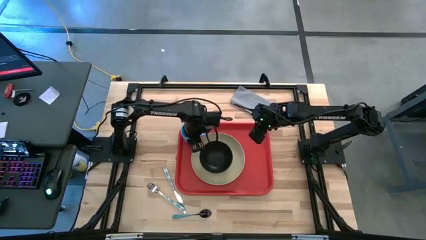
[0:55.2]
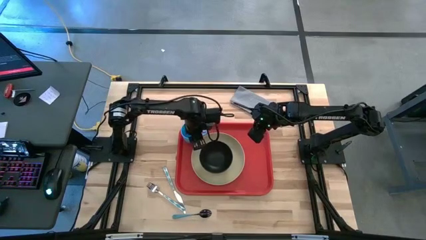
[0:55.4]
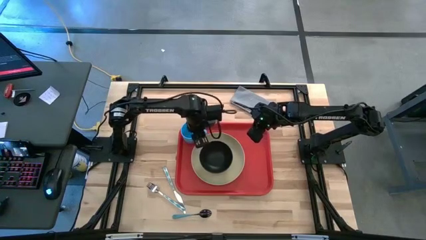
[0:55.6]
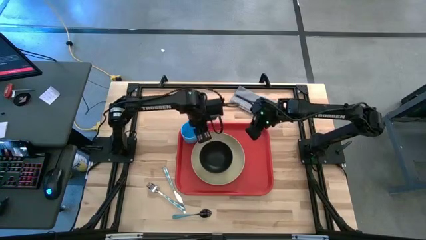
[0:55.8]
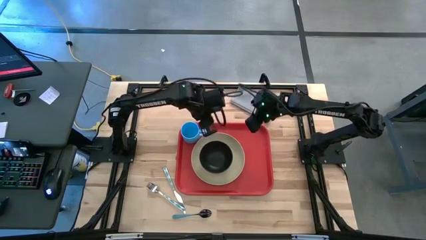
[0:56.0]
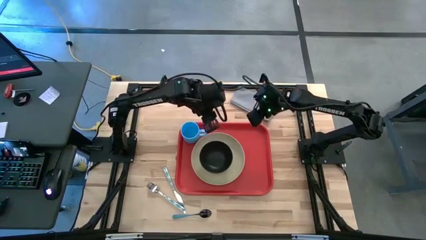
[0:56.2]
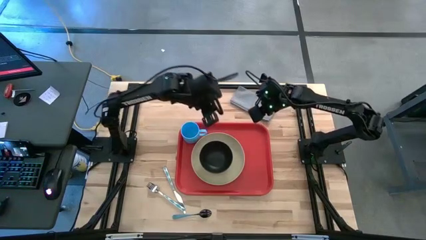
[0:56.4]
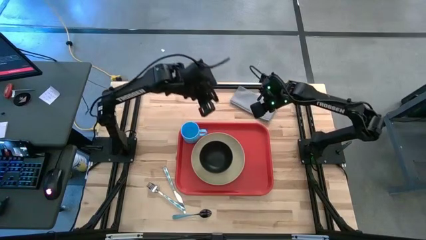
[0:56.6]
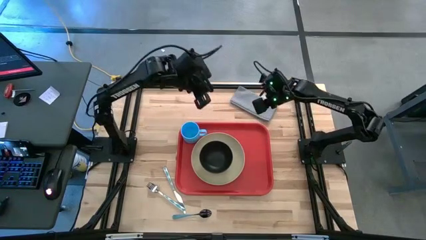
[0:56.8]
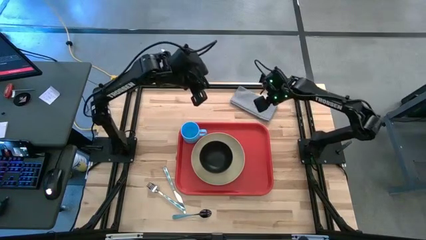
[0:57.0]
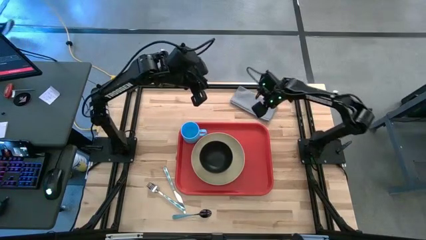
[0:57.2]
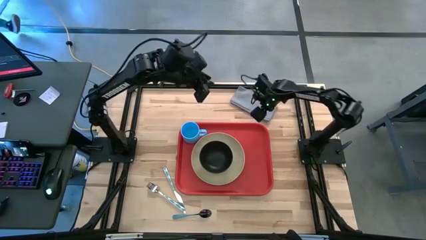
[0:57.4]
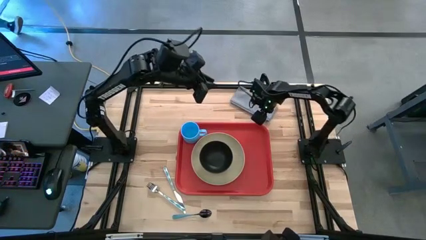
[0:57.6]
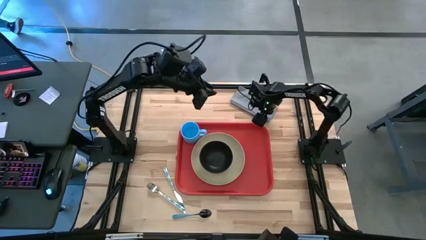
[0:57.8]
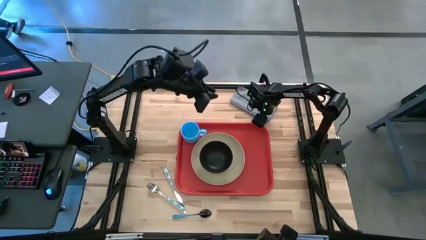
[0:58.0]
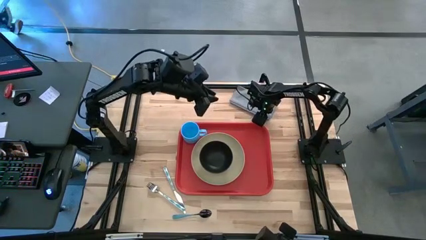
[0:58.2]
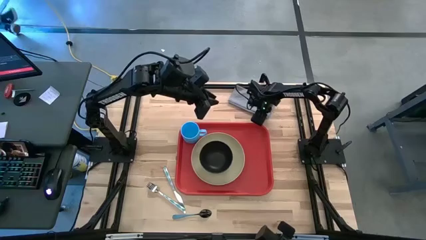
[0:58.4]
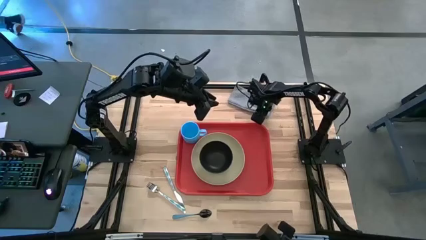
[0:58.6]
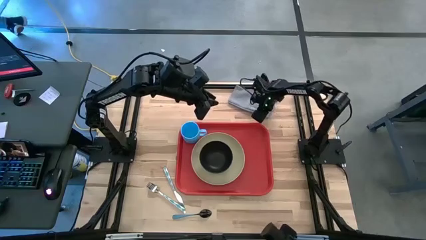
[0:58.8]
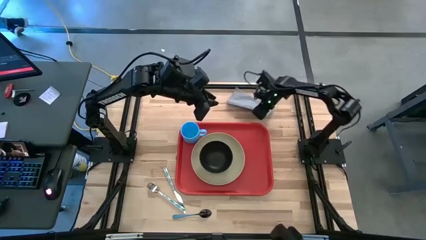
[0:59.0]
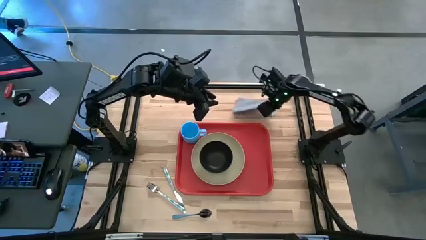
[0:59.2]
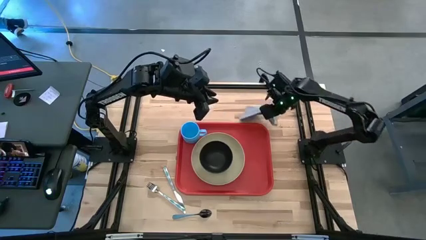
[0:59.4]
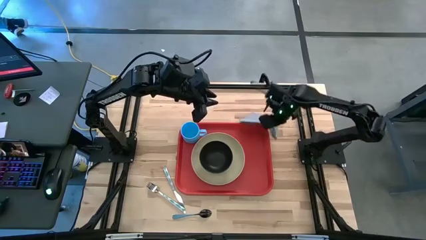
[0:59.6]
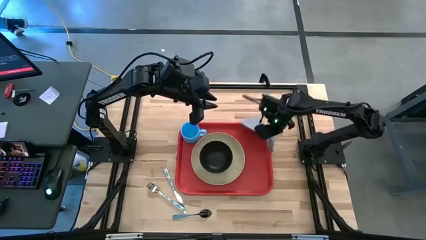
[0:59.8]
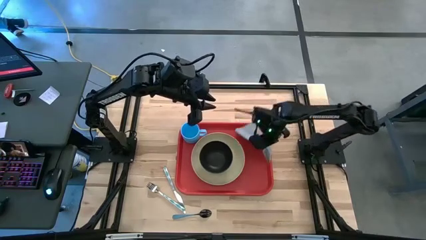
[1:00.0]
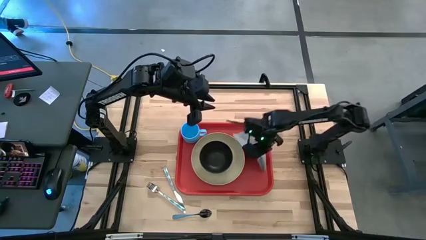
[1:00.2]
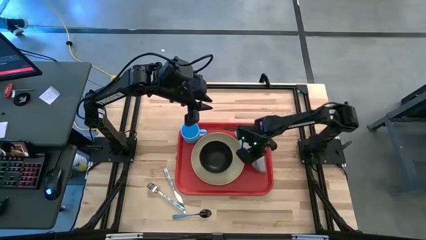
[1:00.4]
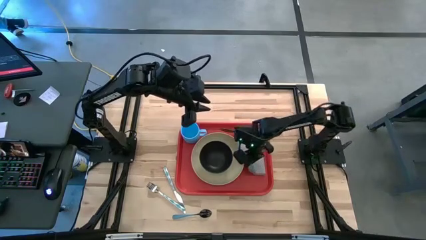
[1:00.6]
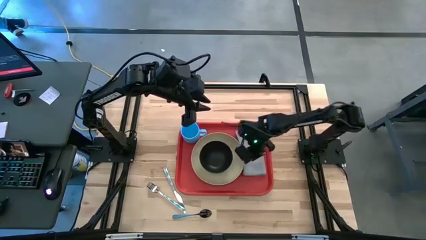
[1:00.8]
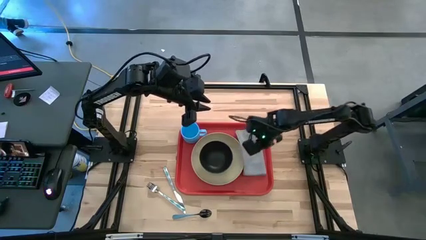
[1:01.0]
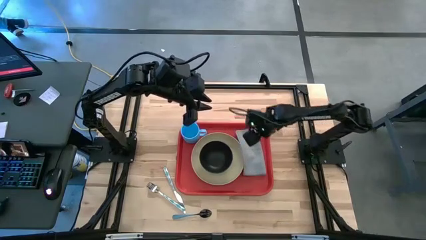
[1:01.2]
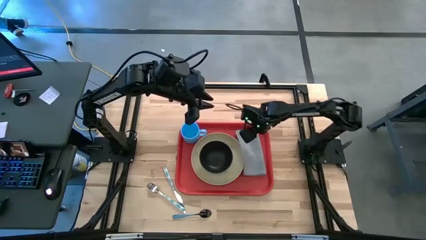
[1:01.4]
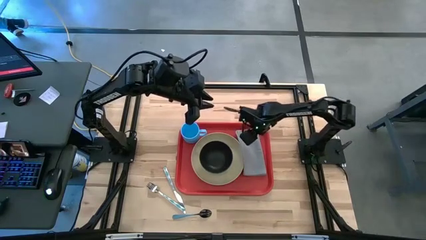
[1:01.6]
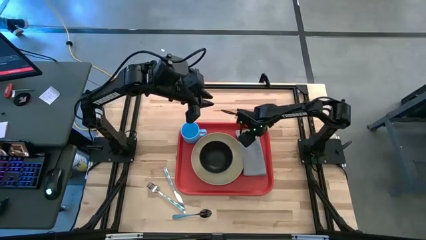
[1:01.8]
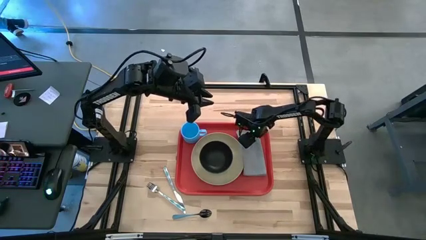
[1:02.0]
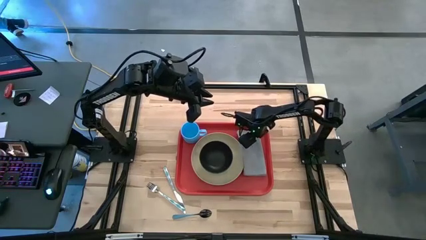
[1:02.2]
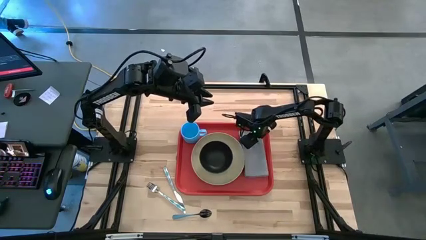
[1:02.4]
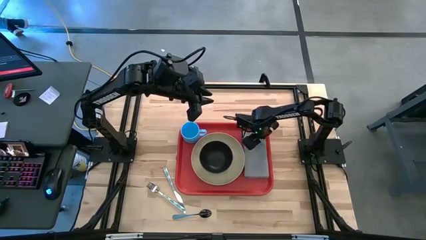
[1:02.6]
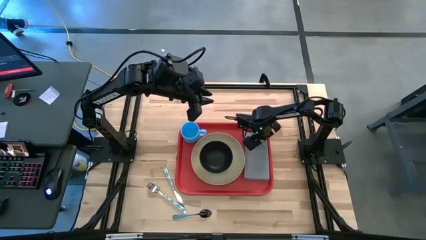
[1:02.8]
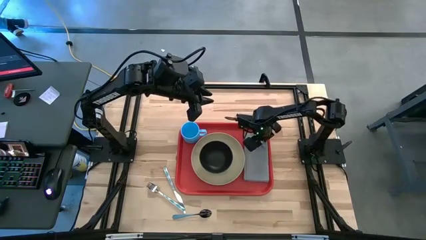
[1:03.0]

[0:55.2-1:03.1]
Task: Set up tray
Put the gray napkin on the red tray to the right of the brown plate

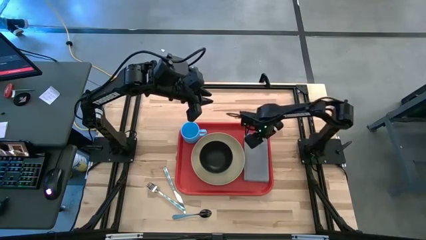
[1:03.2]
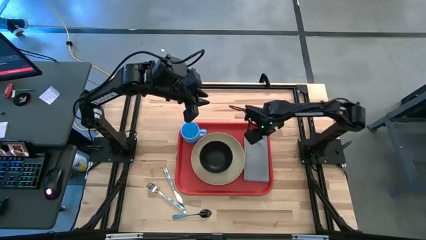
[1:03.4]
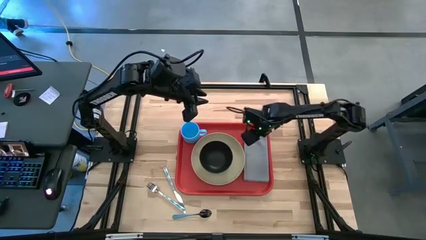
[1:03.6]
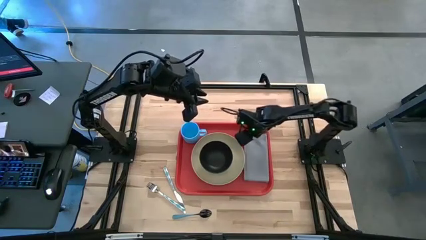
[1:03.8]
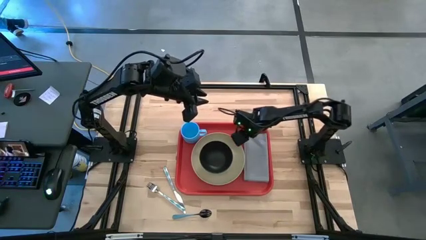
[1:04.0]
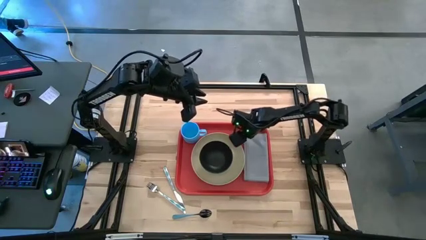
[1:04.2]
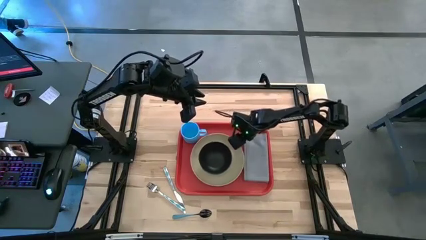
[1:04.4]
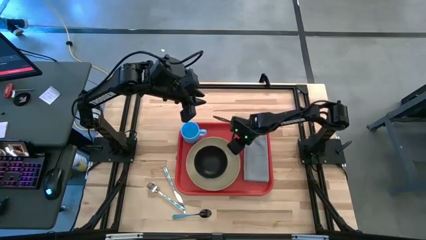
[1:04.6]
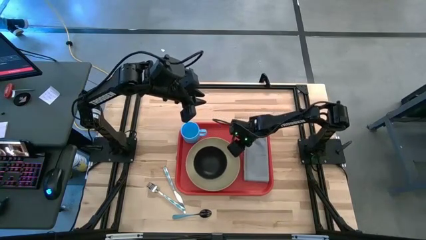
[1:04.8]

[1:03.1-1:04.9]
Adjust the brown plate

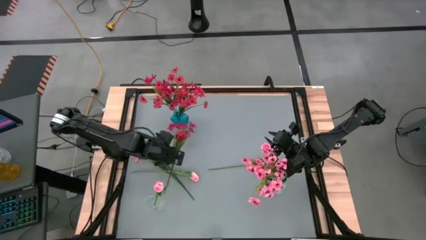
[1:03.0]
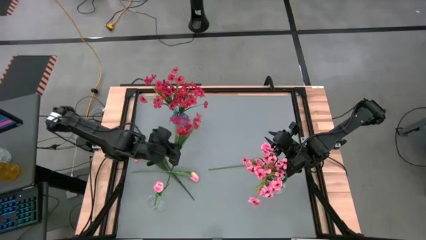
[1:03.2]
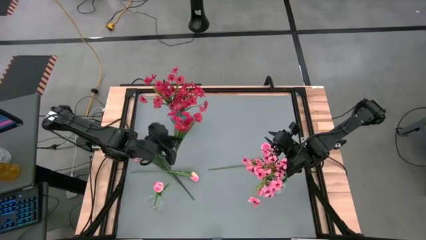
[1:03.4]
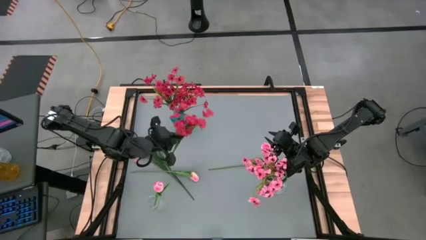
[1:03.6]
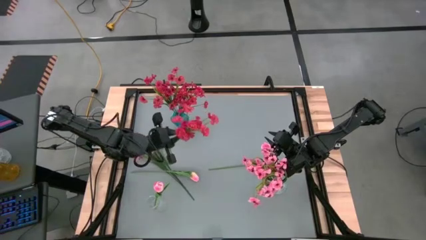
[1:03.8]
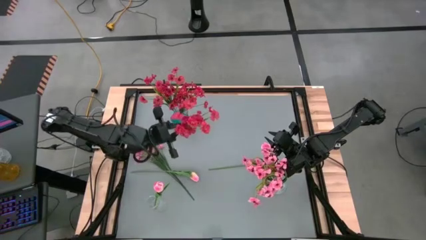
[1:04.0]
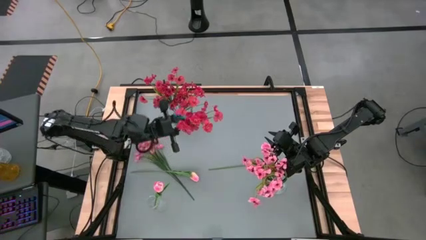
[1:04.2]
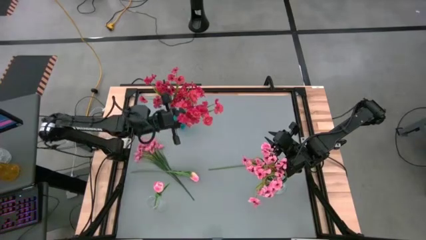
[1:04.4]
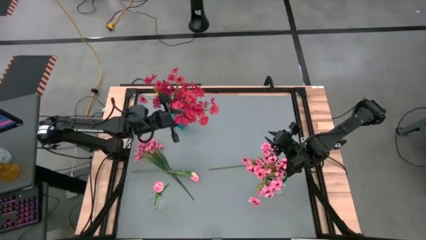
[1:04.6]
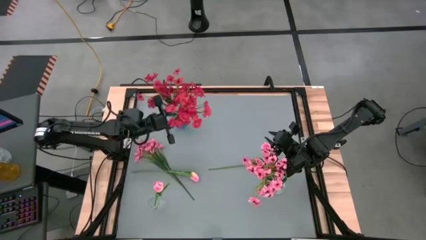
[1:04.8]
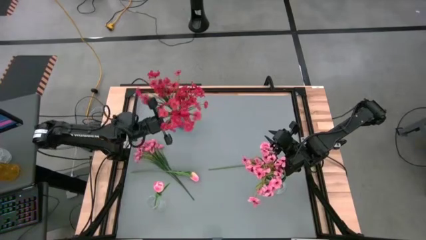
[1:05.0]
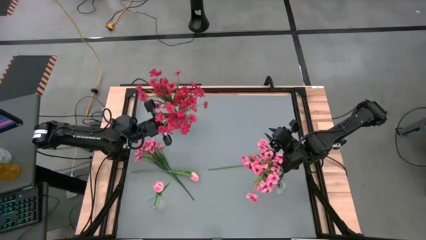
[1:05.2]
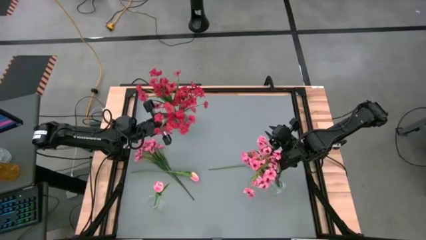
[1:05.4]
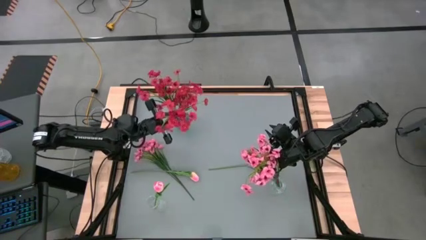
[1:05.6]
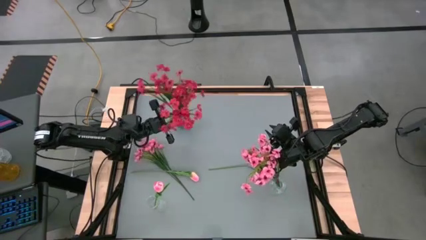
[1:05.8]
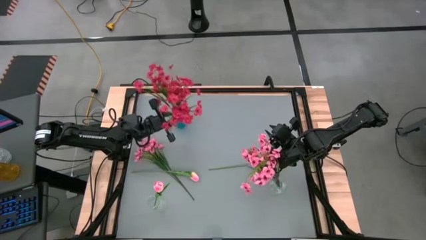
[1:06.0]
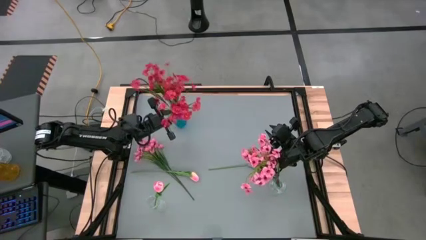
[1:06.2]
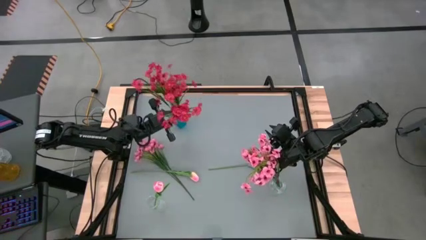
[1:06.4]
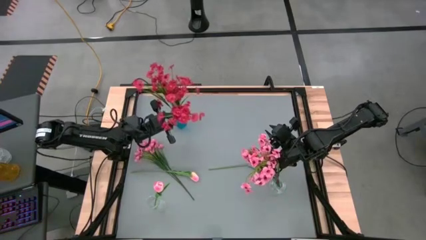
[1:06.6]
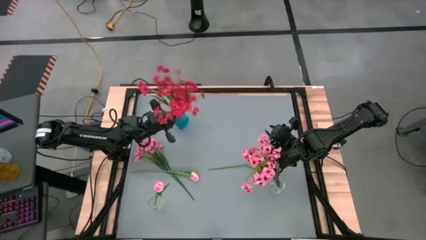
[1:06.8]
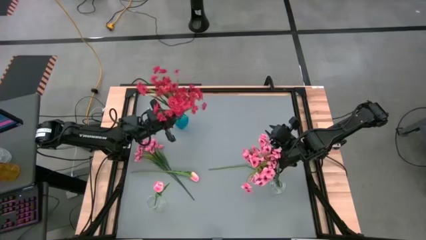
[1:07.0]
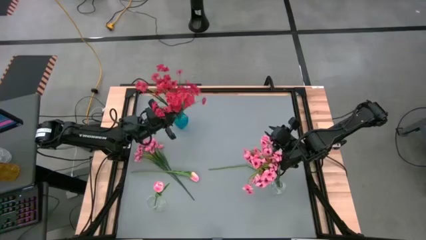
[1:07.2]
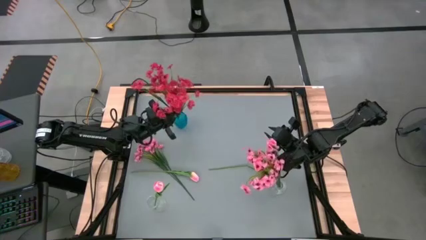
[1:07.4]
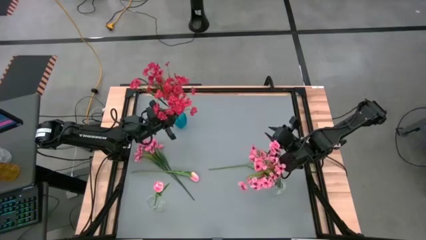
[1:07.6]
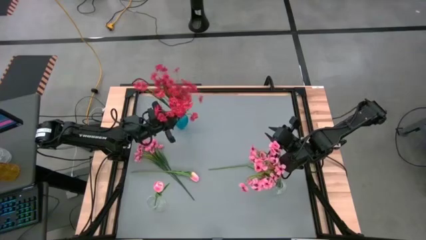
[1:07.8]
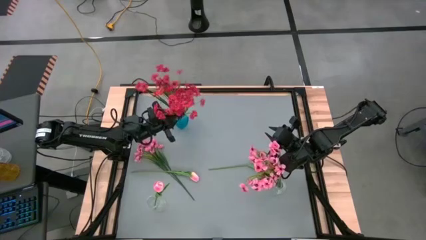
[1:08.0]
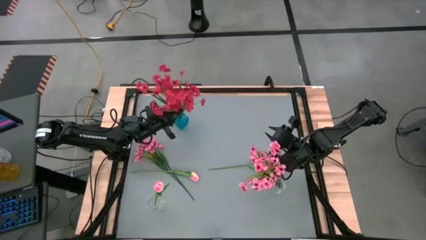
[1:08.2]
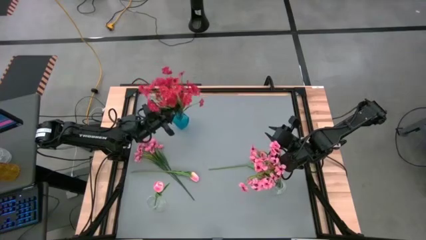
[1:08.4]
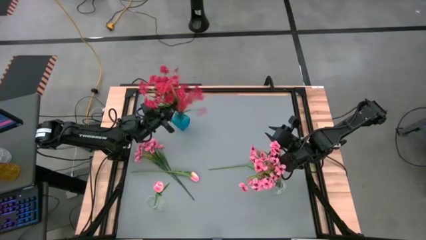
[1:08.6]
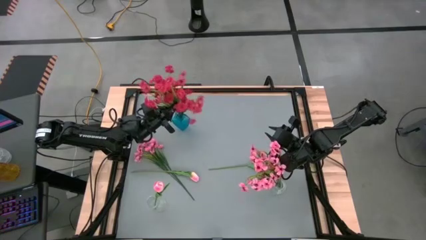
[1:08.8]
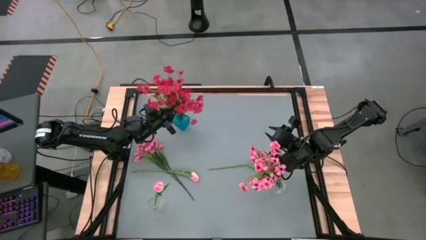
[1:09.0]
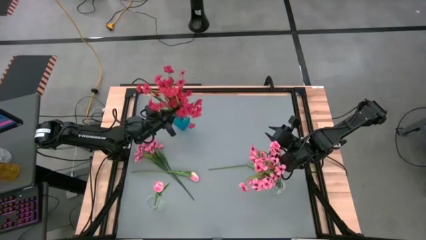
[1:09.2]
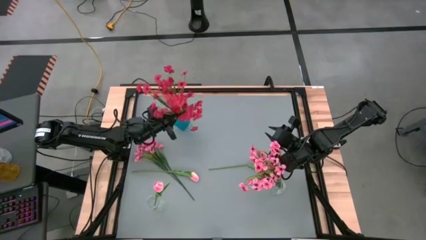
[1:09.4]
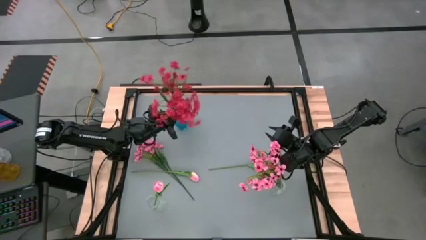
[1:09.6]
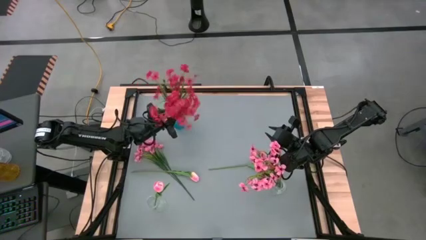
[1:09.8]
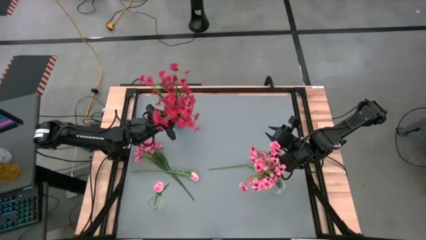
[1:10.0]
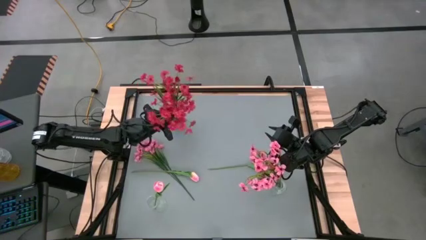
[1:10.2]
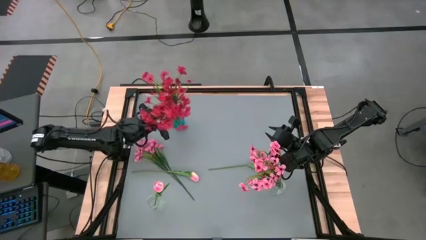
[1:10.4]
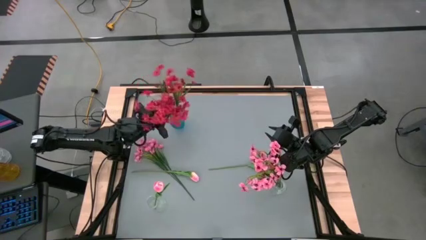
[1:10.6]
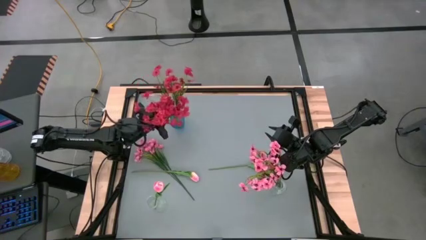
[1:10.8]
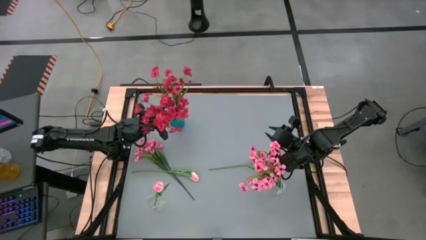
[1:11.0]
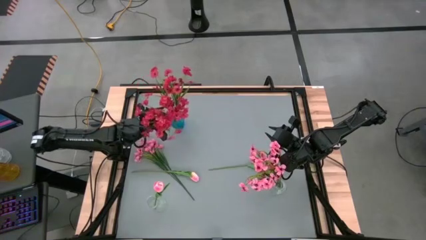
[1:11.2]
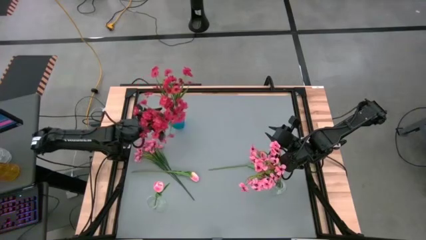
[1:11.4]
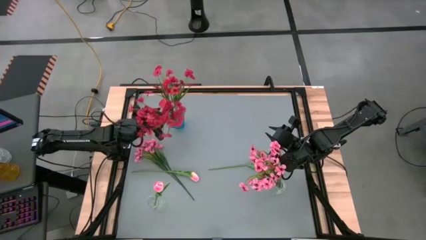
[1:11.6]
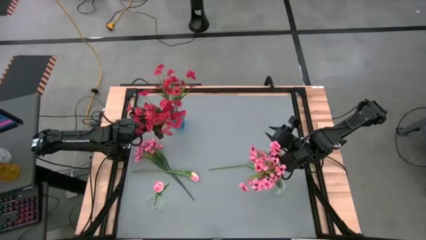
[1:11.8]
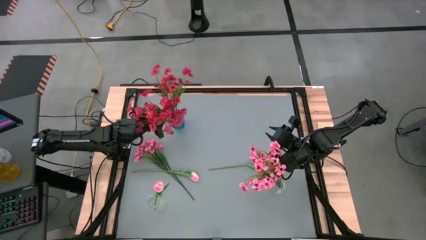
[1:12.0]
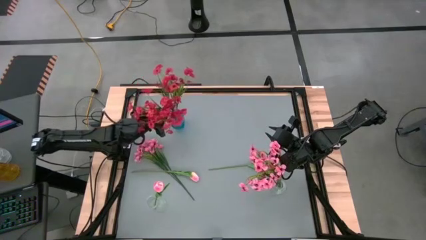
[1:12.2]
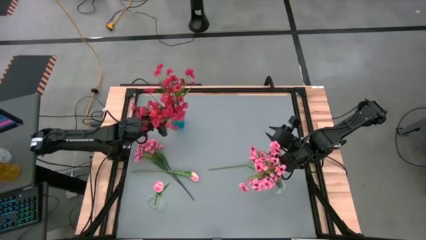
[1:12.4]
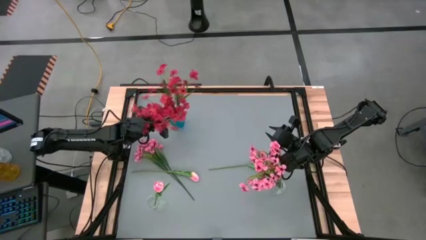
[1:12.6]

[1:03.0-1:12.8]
Task: Sort flowers into vase by color
Put the red flowers into the blue vase
